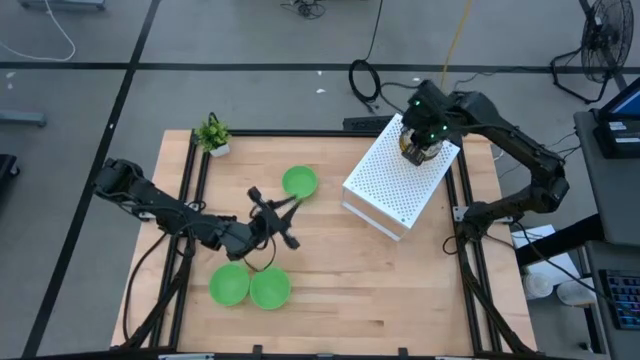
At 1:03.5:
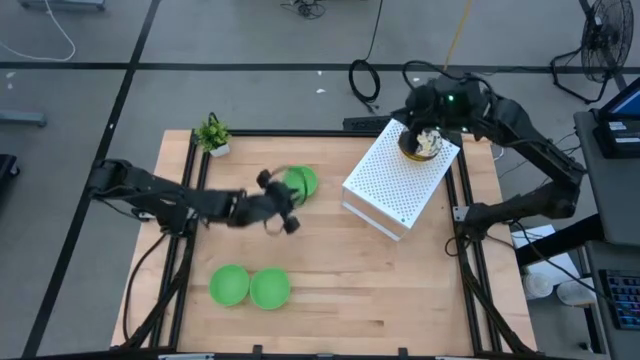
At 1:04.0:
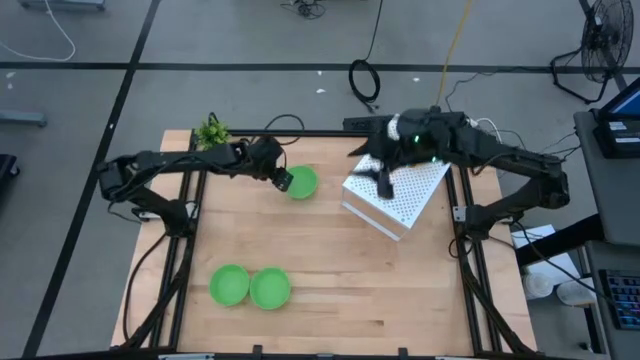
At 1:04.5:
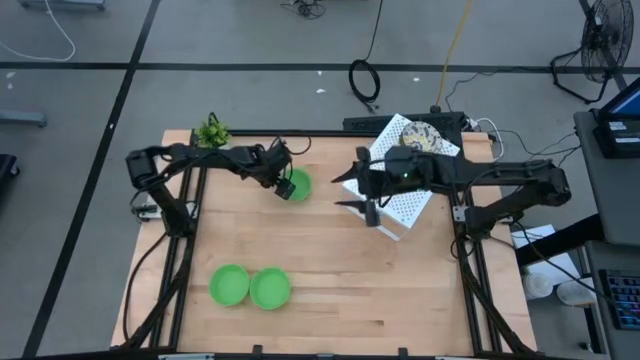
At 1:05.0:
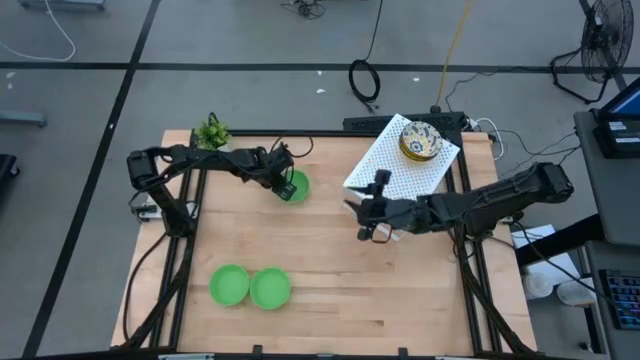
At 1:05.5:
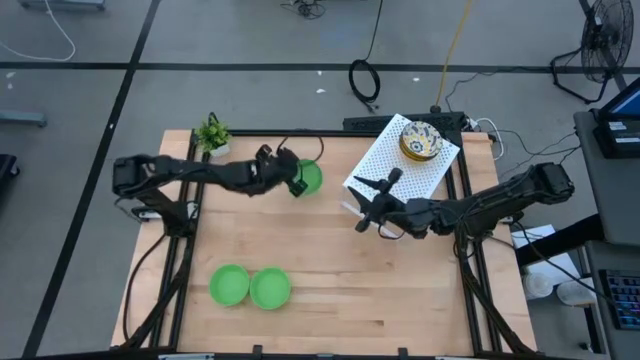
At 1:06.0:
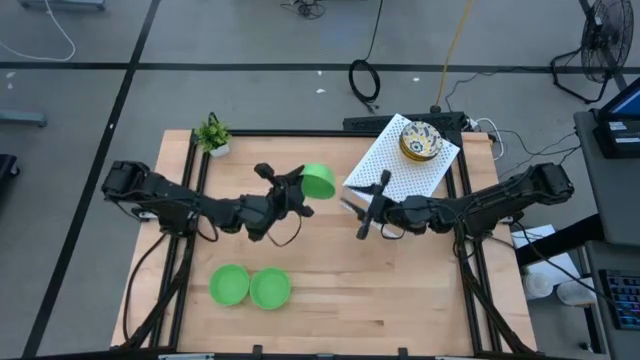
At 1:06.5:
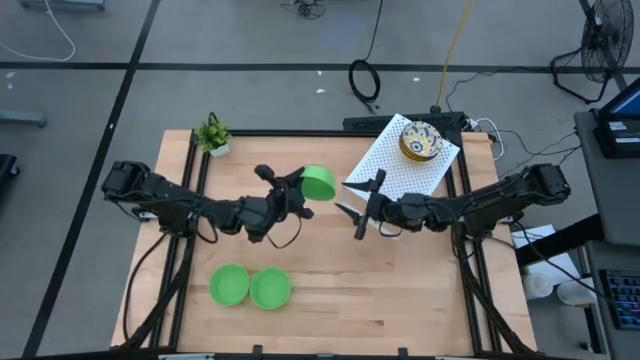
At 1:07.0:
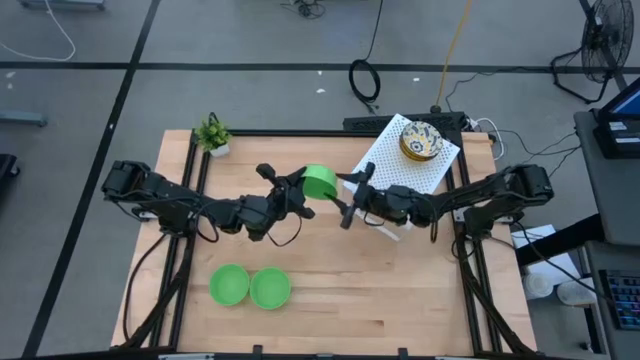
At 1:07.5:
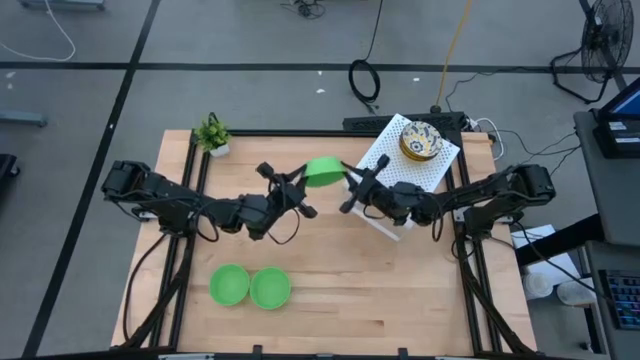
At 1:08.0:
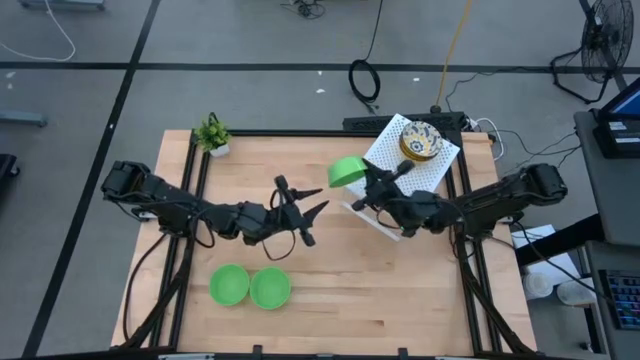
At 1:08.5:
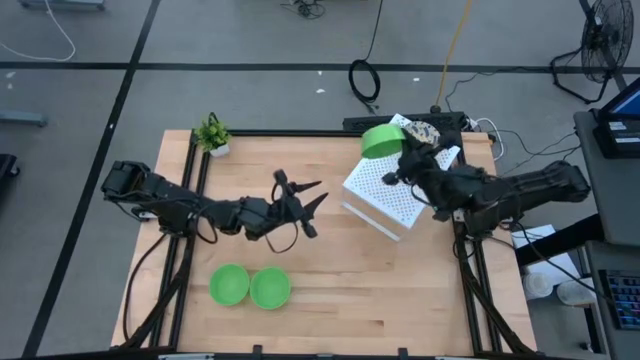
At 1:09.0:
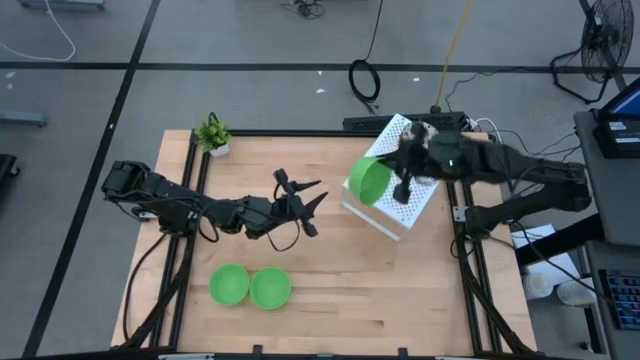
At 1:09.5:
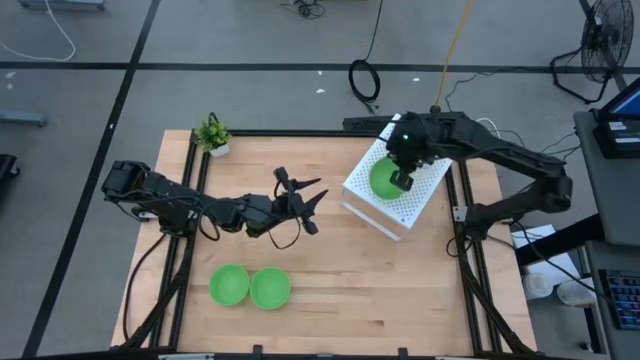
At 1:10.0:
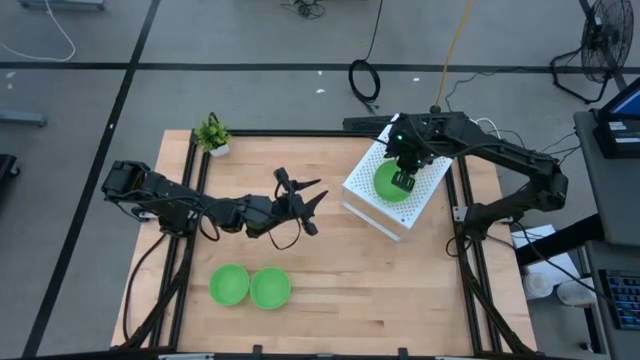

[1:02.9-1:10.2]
Task: Pick & Place Mini bowls
Put the top green bowl on the shelf

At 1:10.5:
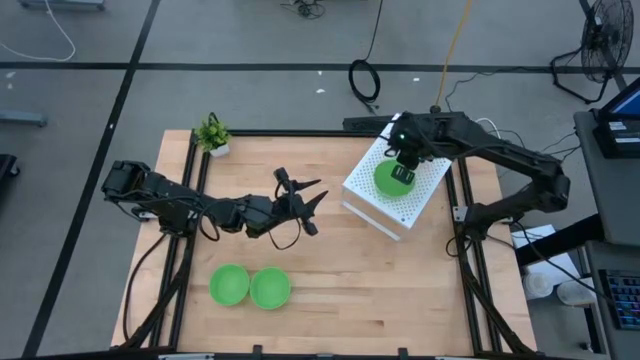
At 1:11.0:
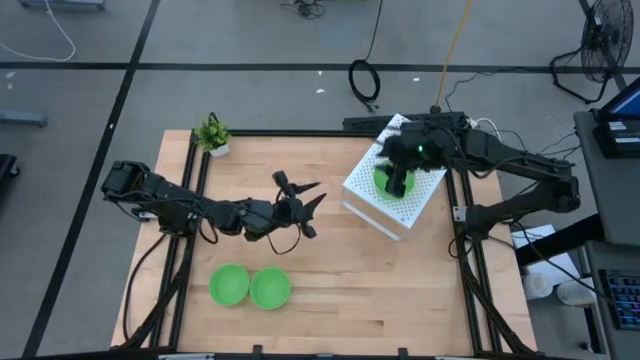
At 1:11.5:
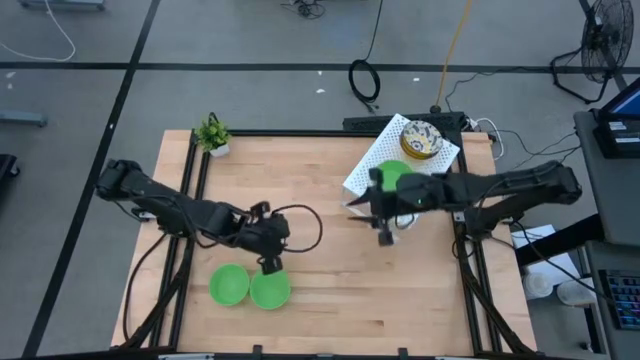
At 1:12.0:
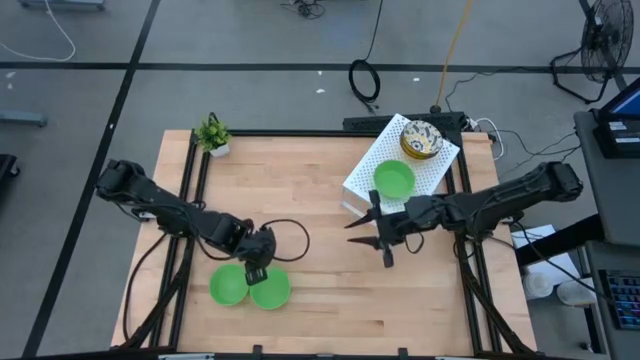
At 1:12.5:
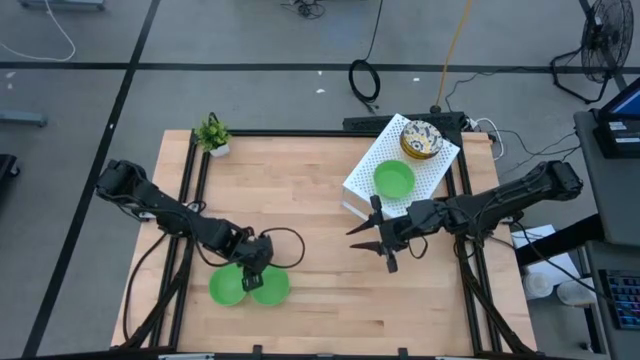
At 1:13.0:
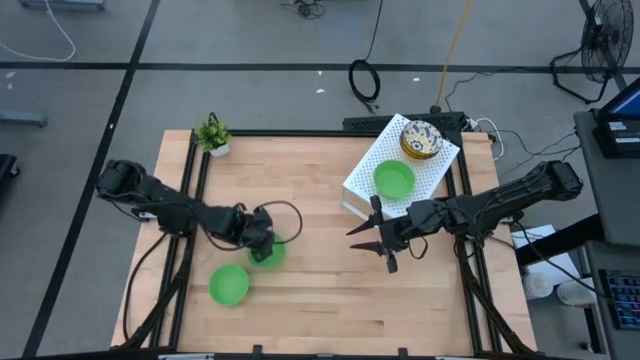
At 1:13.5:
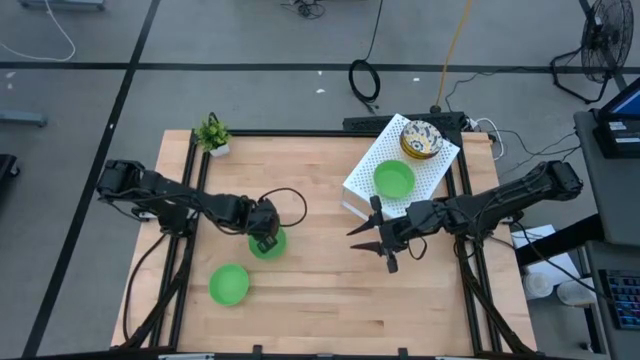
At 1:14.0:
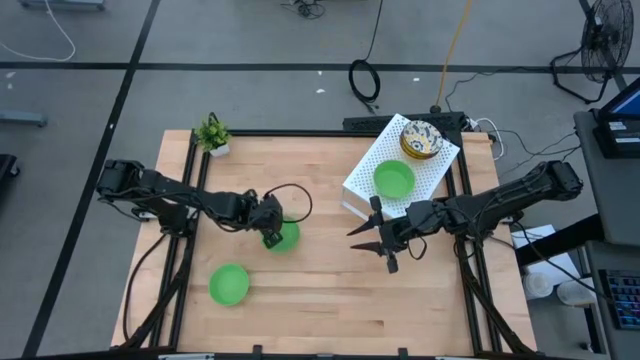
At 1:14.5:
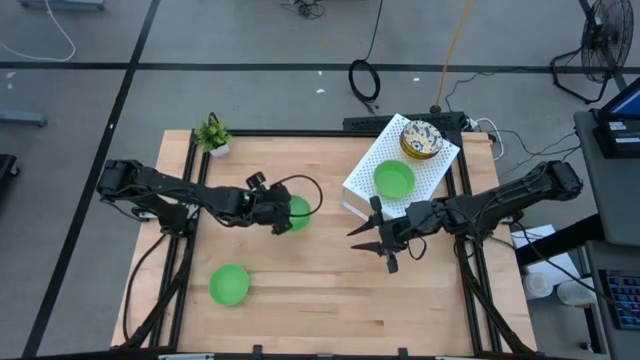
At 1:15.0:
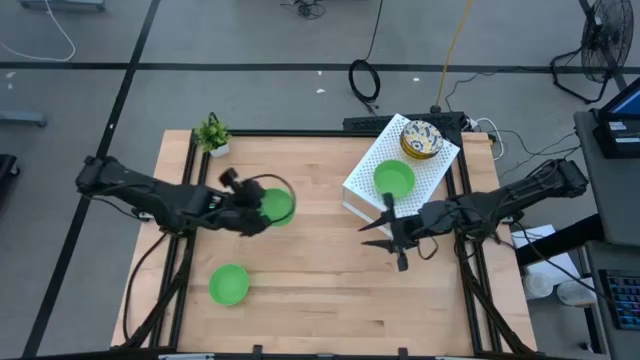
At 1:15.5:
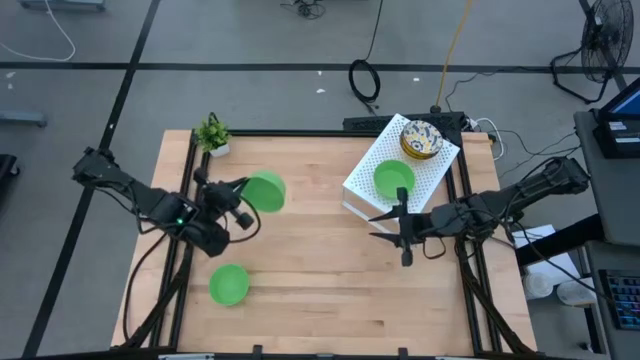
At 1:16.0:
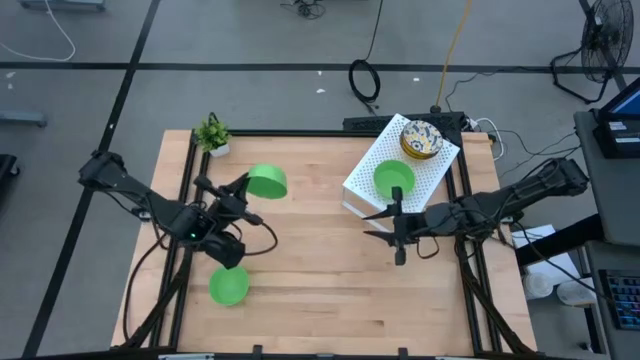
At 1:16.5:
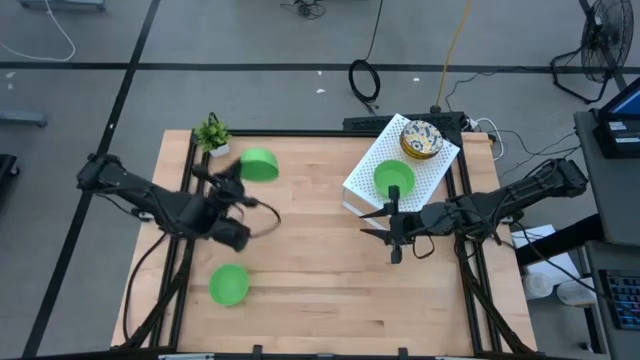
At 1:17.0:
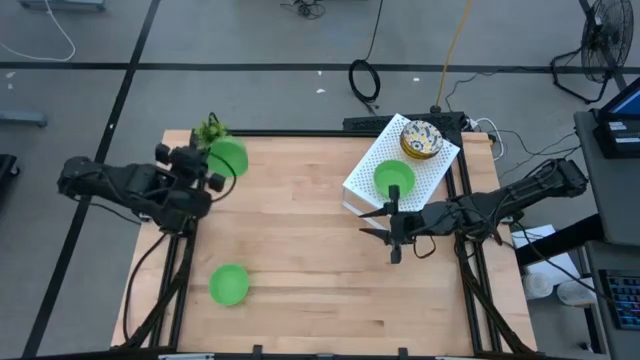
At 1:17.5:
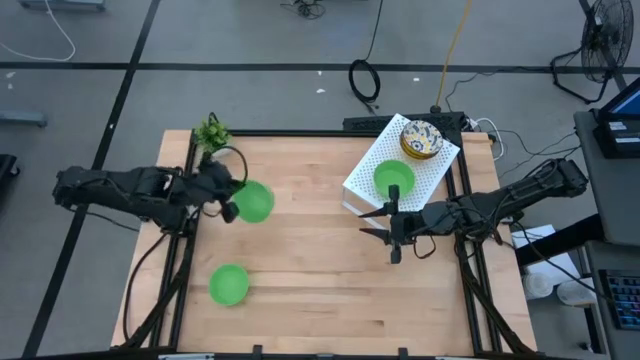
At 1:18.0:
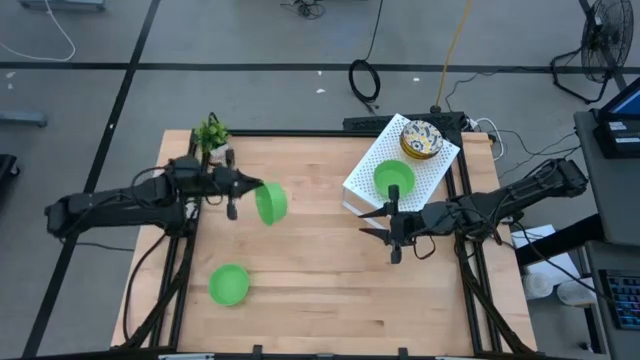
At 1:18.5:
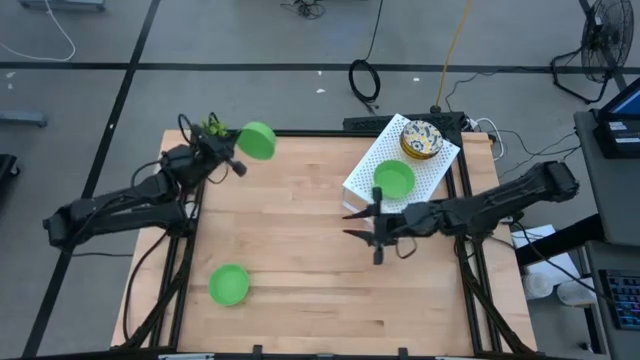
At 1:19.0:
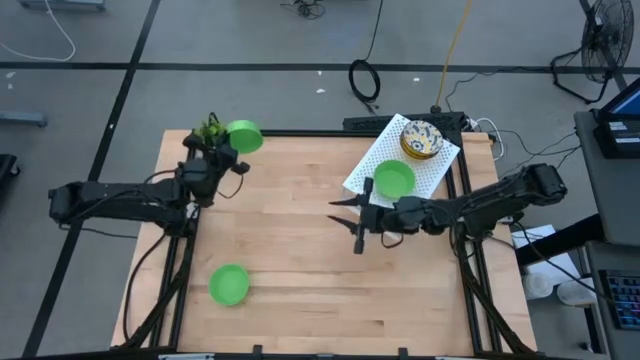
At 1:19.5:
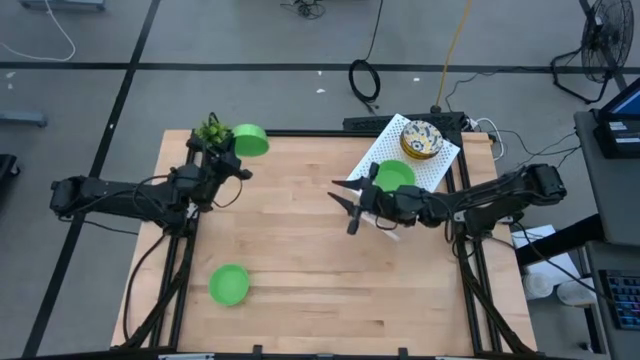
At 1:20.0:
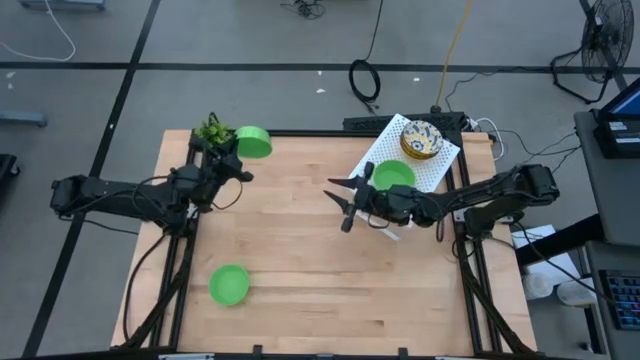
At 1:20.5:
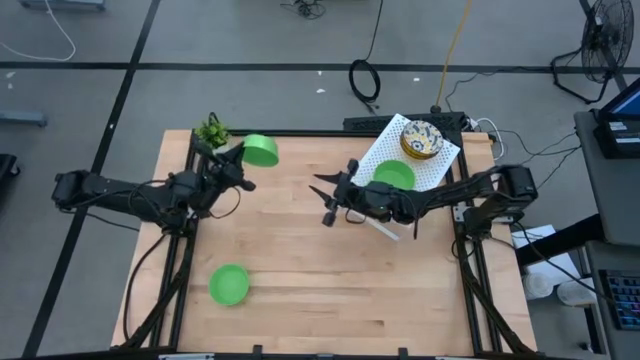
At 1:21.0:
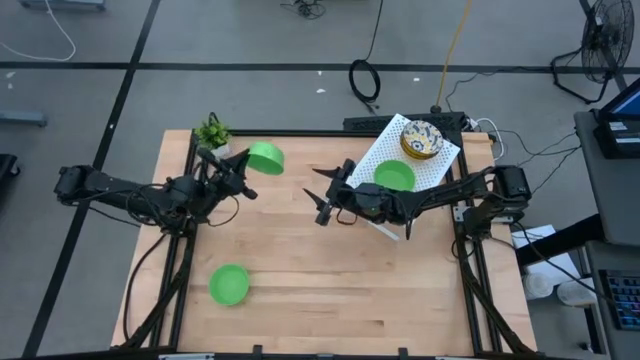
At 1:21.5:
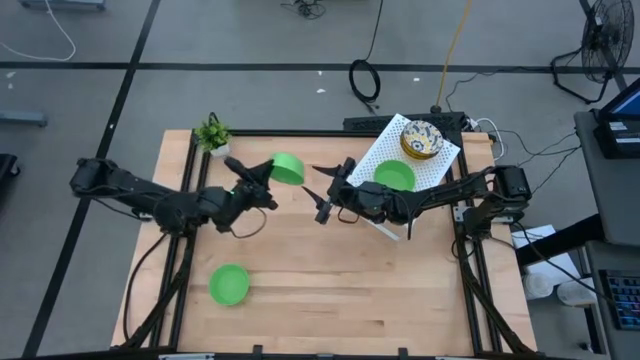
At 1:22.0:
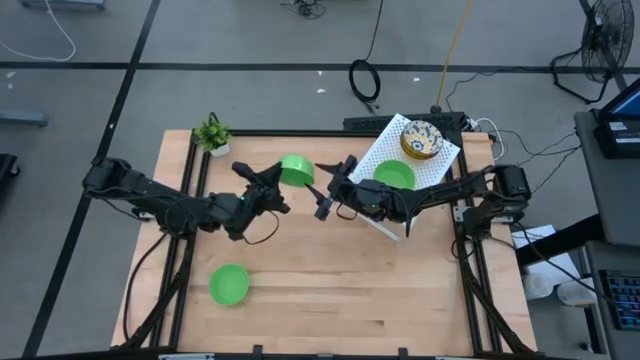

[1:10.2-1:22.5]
Stack the right green bowl on top of the other green bowl on the shelf

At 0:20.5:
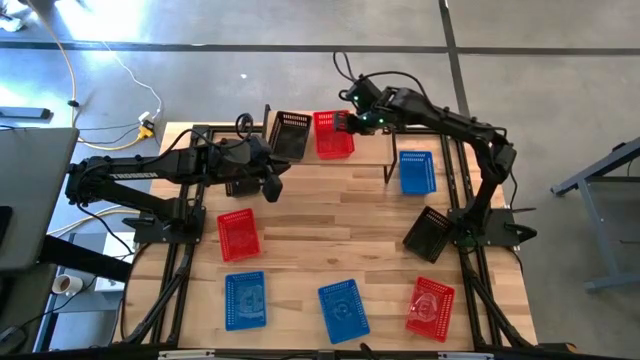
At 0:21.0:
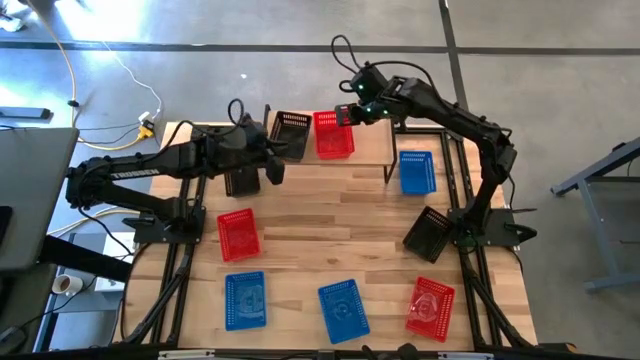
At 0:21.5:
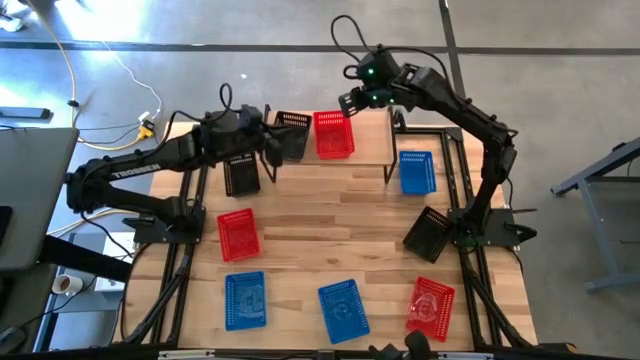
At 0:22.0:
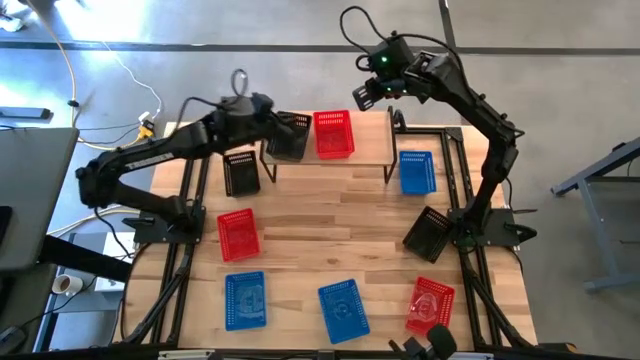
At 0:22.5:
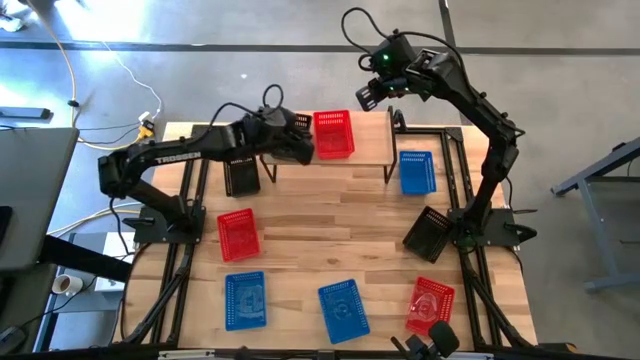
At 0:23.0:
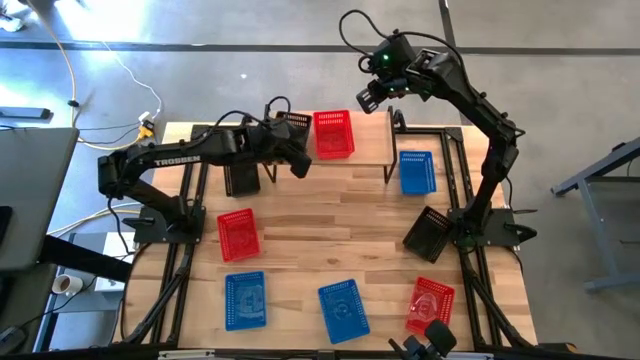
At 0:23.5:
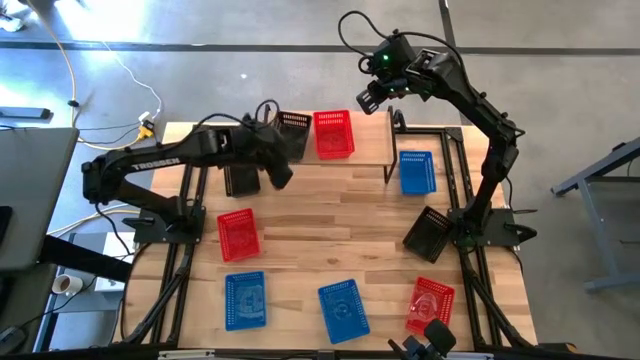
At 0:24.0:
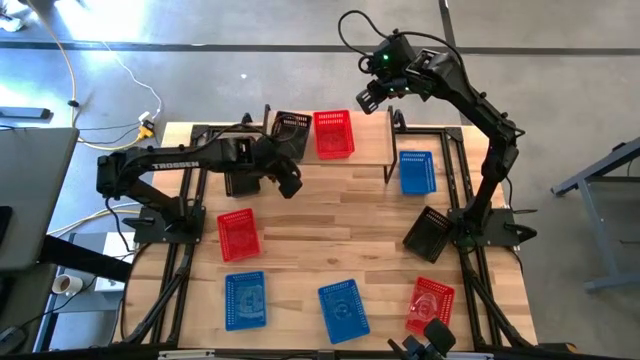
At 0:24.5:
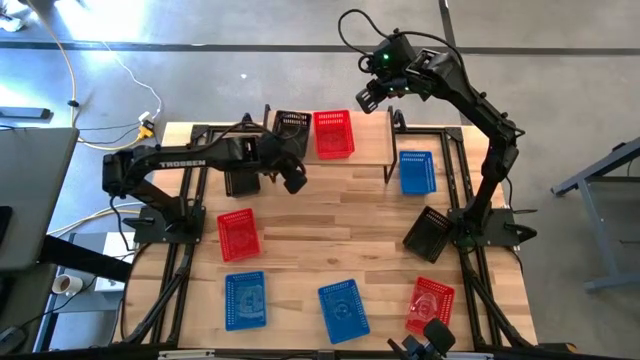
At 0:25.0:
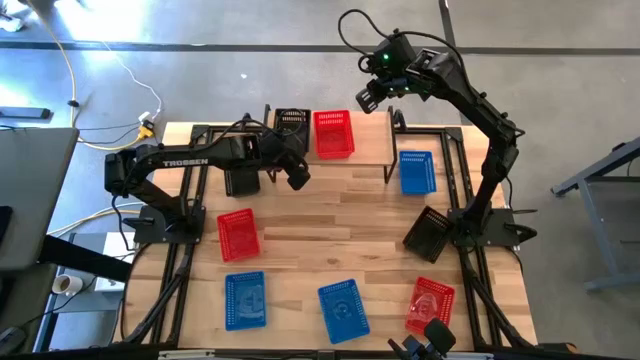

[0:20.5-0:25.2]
Task: Stack baskets on shelf by color
Adjust the black bin on the shelf
